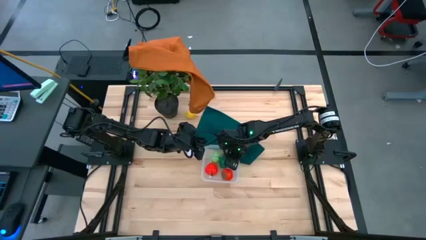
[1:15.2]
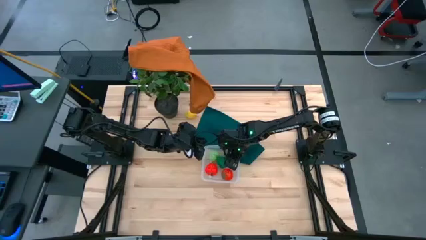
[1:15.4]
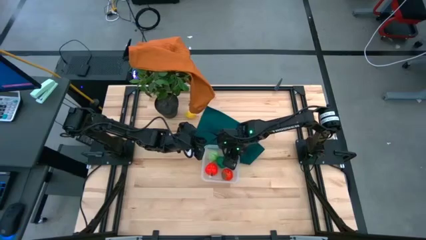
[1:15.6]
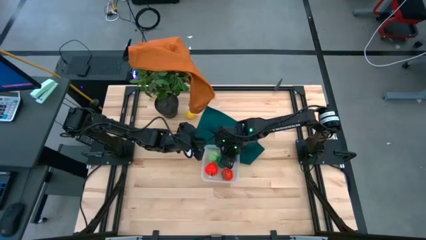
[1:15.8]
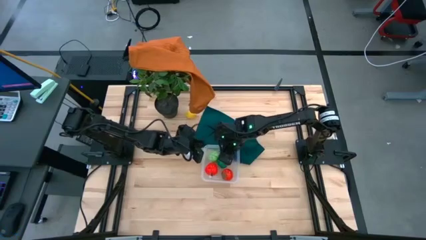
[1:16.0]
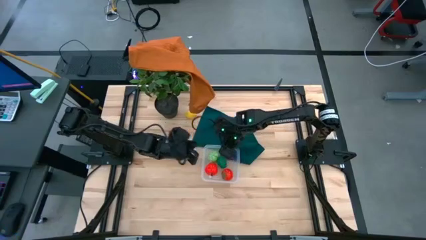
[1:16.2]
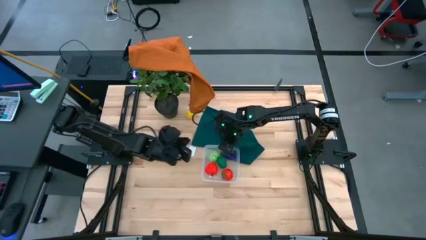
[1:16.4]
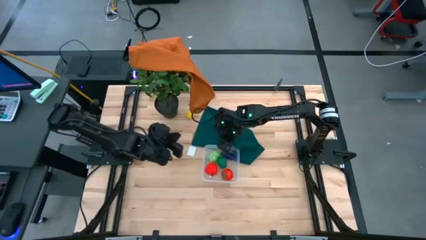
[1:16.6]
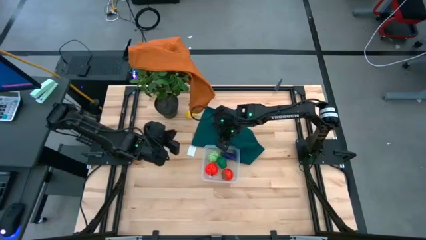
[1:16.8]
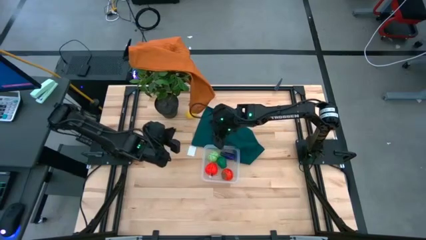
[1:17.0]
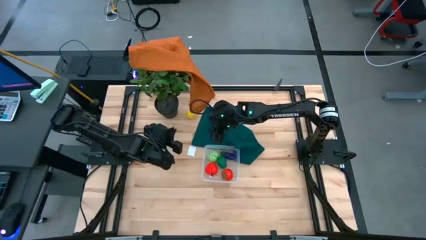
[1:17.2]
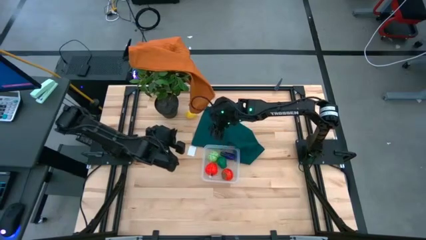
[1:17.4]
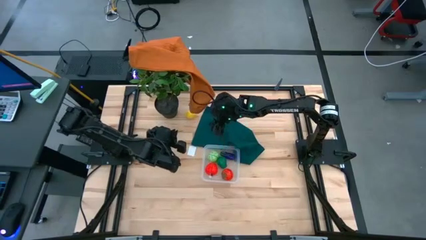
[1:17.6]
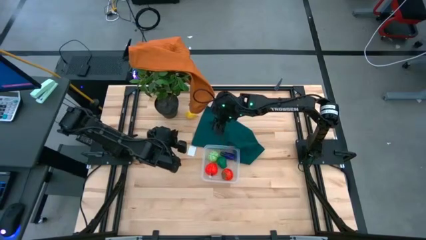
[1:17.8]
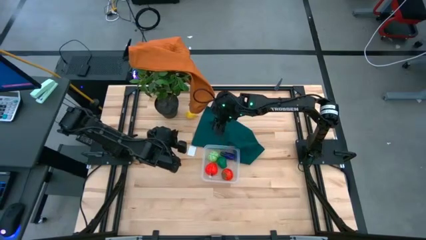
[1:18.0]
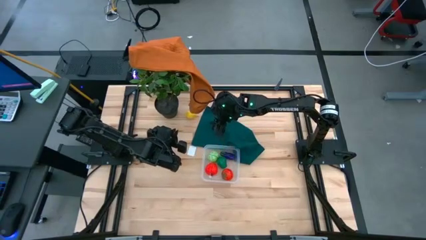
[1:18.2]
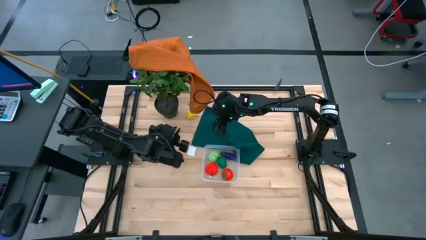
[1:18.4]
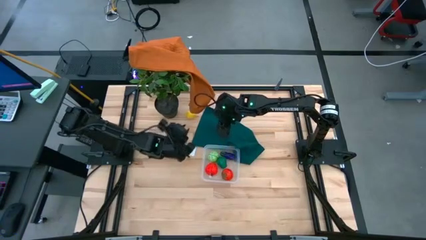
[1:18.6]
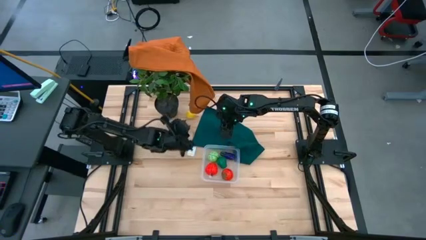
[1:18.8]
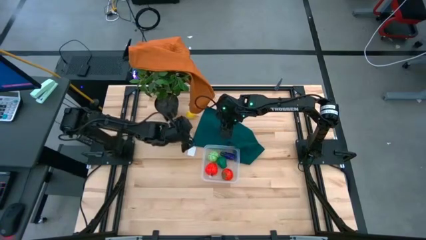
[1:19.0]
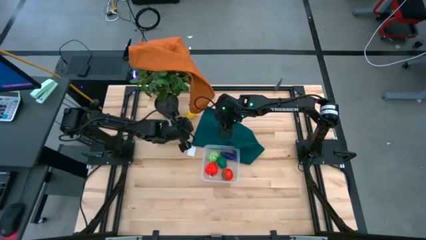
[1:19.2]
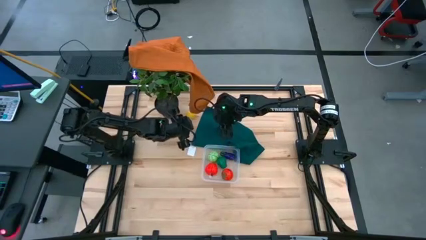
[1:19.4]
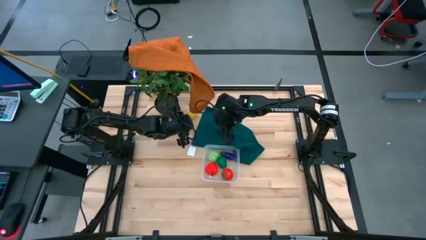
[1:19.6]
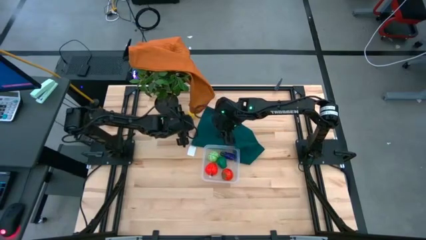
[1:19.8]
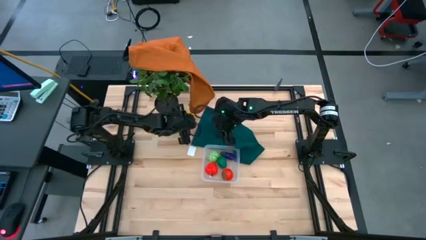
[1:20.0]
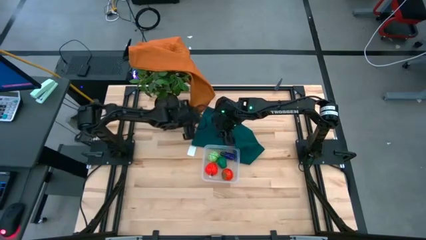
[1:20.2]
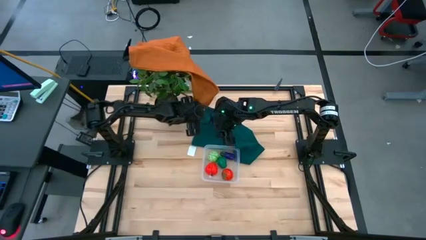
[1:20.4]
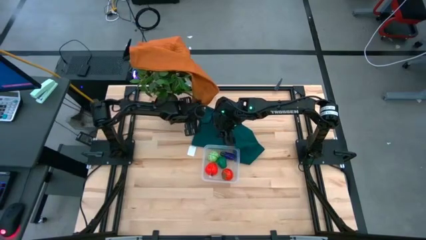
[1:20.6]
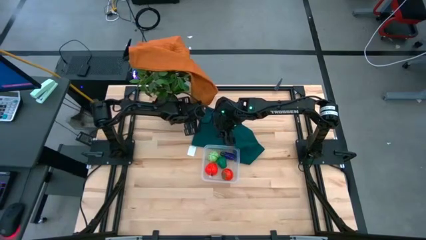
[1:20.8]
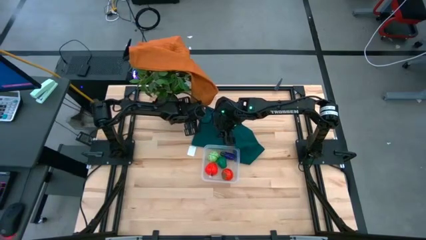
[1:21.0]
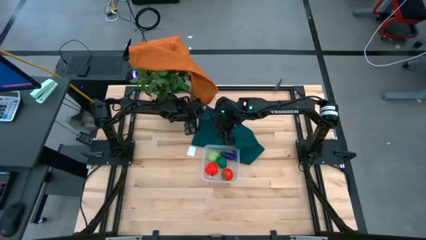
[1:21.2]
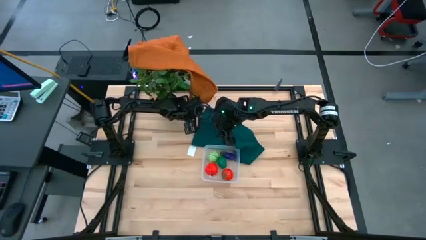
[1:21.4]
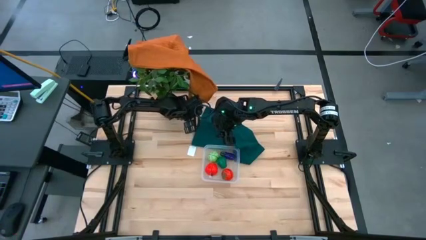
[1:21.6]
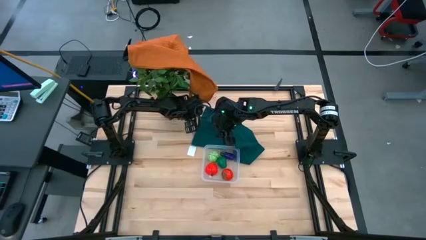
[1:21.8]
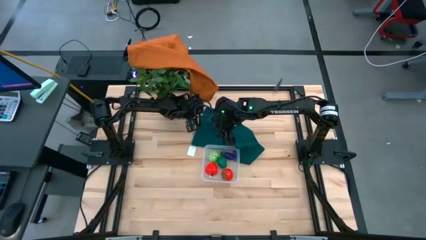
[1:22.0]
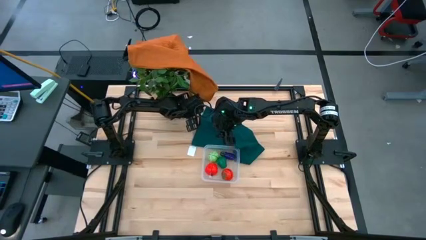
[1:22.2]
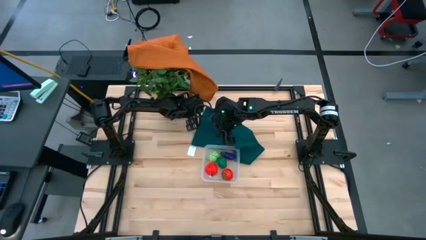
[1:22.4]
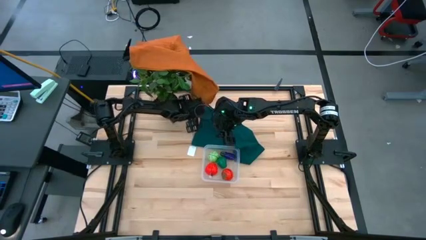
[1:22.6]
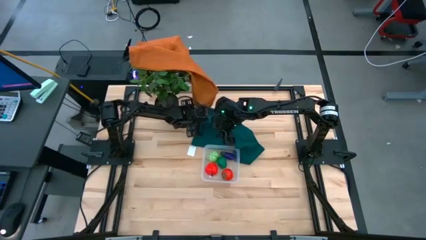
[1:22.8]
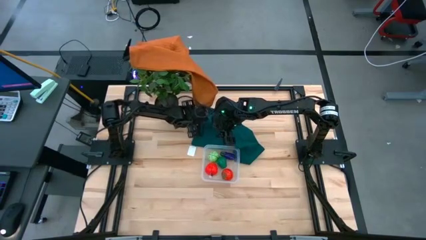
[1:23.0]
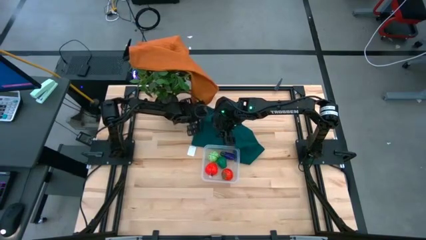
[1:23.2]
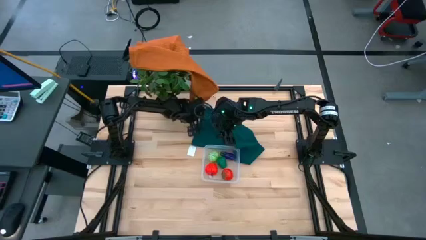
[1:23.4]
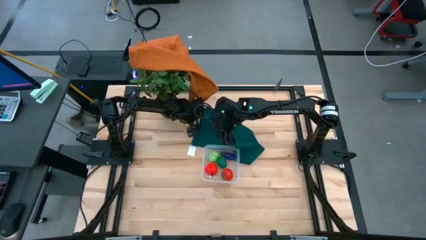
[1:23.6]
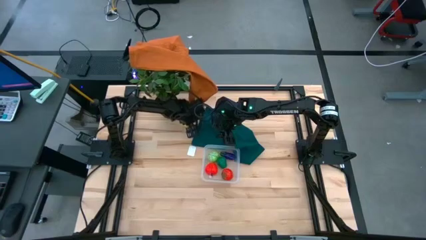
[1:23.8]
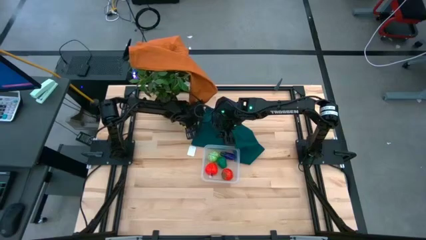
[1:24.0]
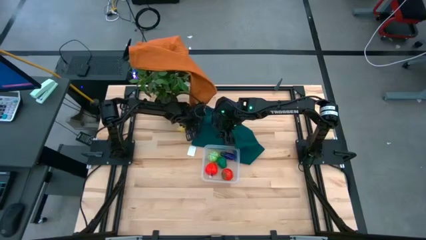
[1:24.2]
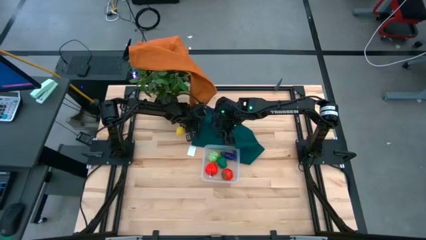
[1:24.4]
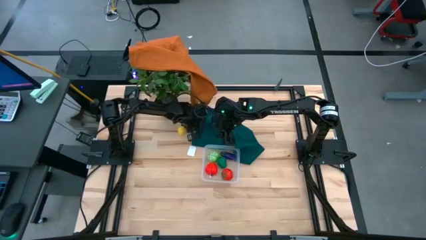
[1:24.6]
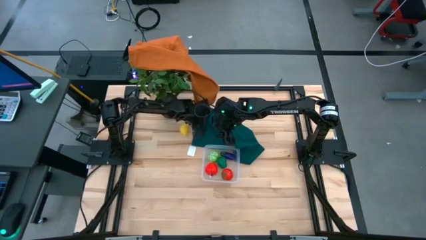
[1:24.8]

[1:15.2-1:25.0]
Task: Pick and placing Produce into tupperware
Put the lemon into the transparent basket
